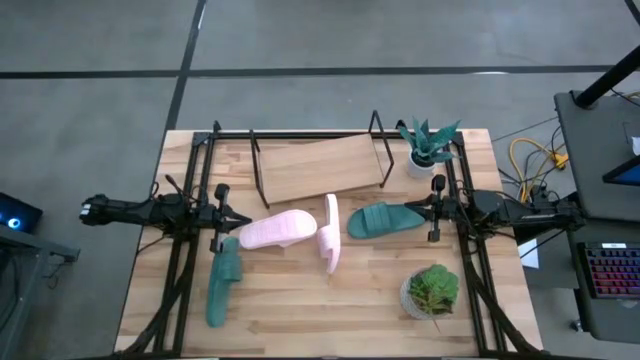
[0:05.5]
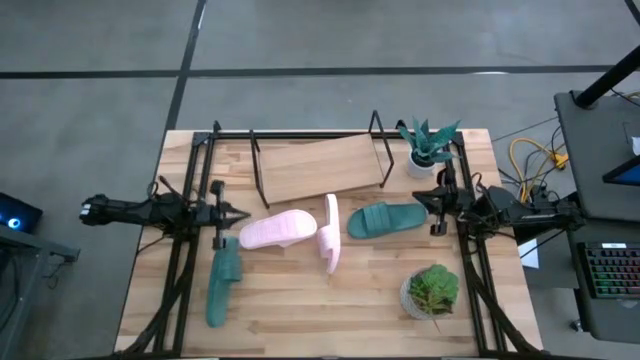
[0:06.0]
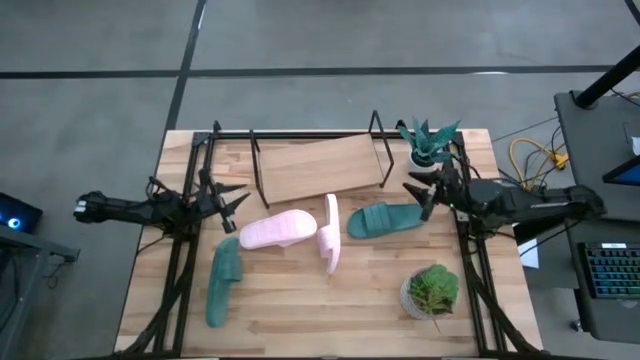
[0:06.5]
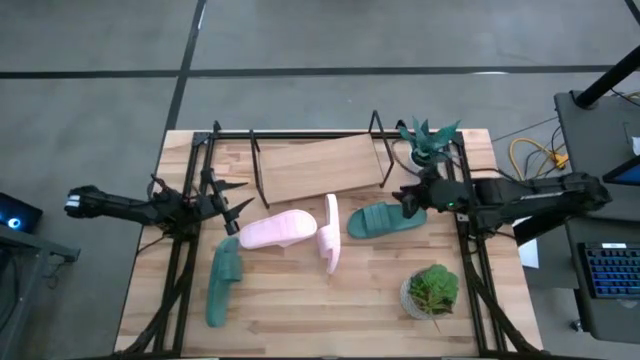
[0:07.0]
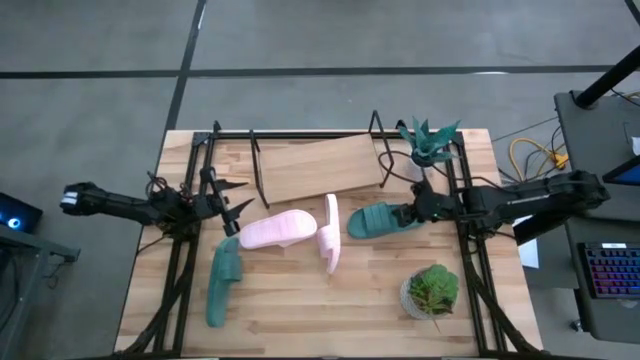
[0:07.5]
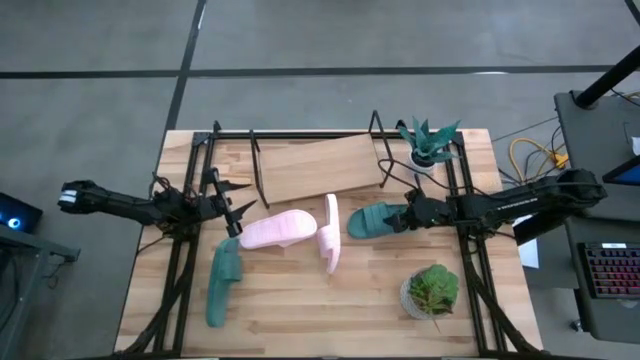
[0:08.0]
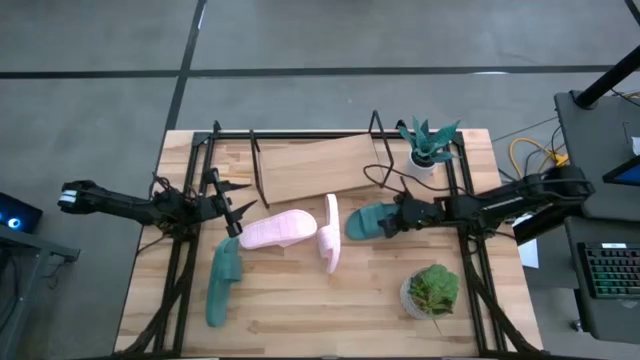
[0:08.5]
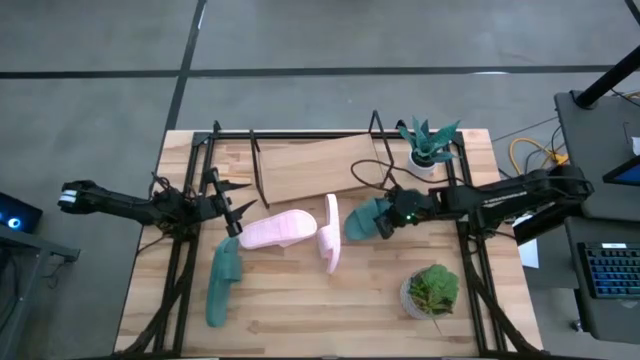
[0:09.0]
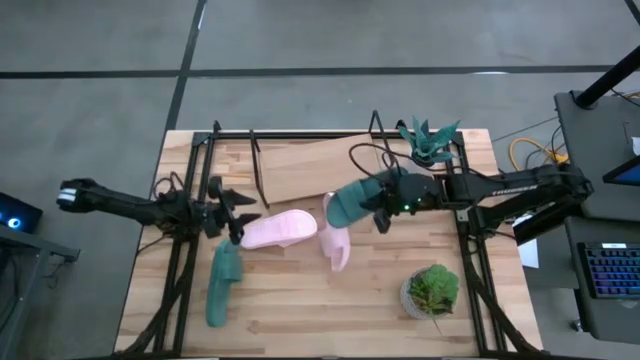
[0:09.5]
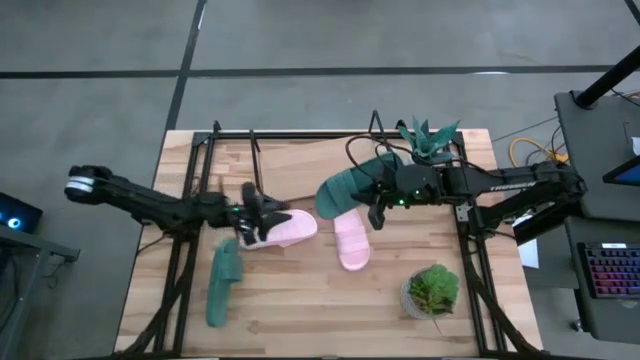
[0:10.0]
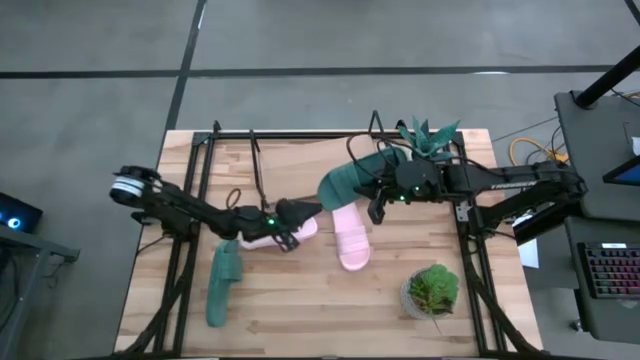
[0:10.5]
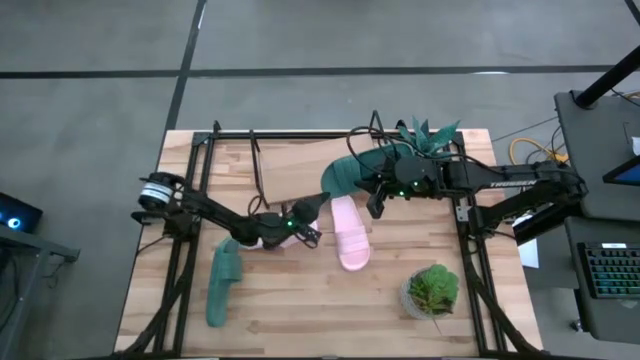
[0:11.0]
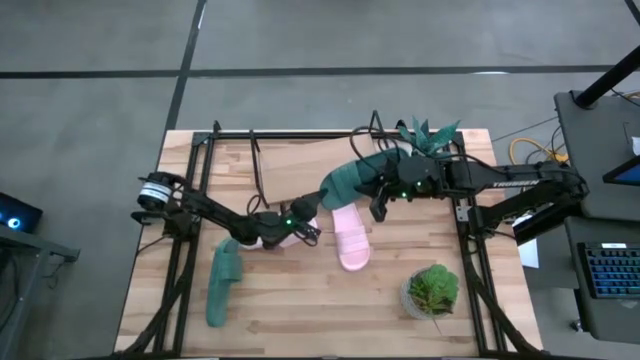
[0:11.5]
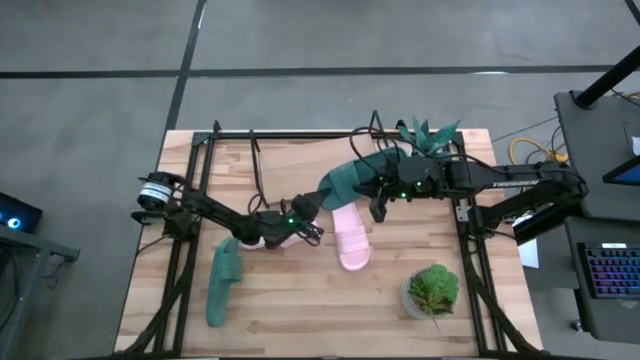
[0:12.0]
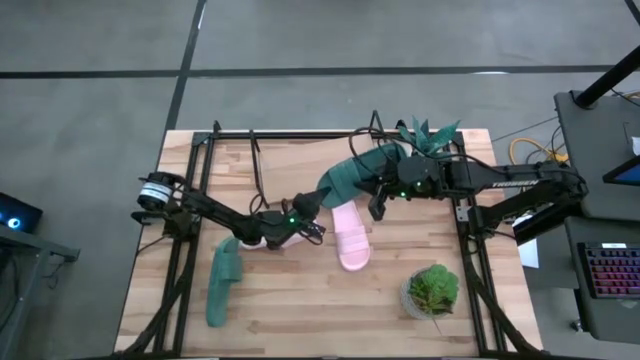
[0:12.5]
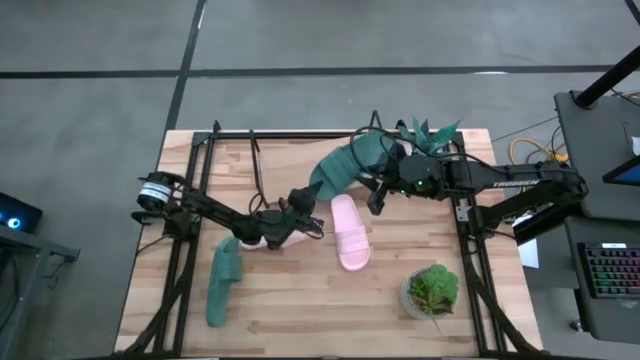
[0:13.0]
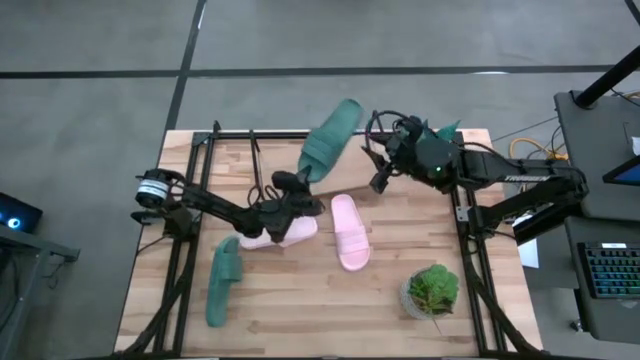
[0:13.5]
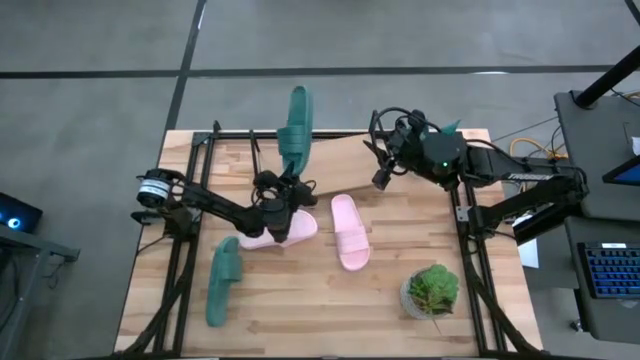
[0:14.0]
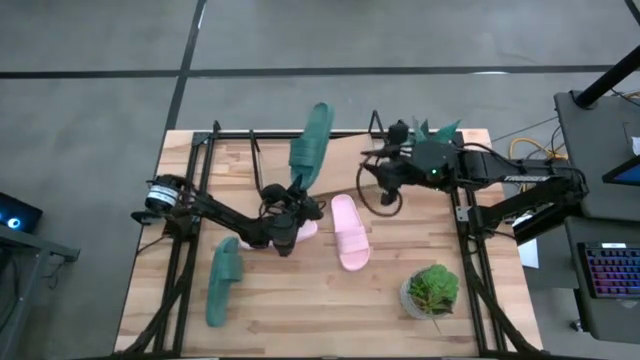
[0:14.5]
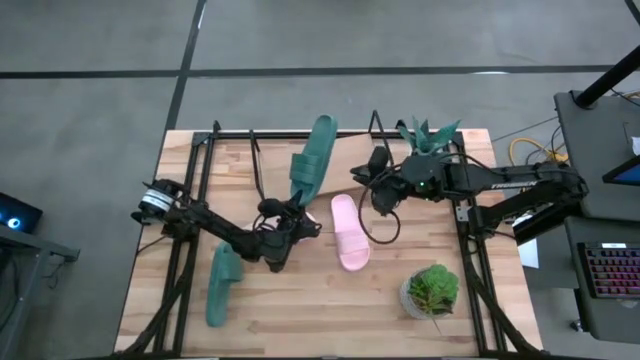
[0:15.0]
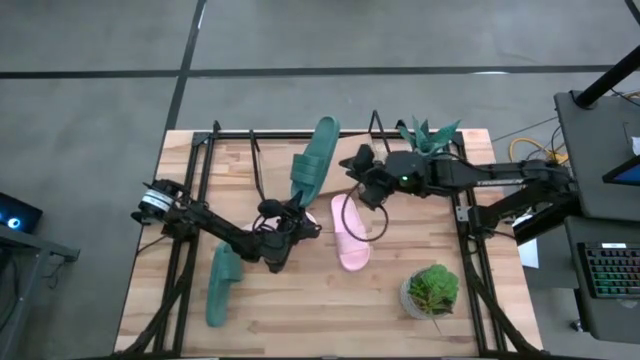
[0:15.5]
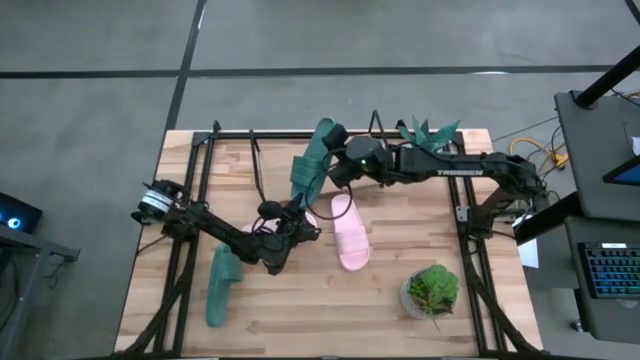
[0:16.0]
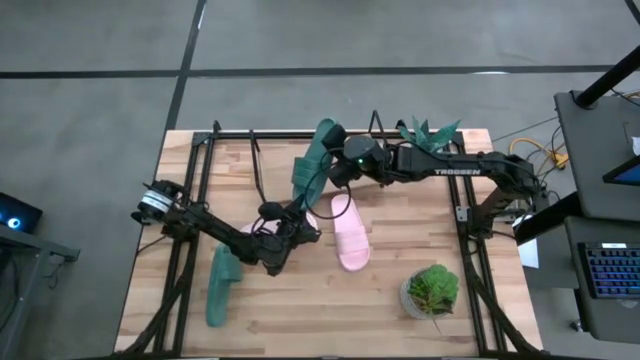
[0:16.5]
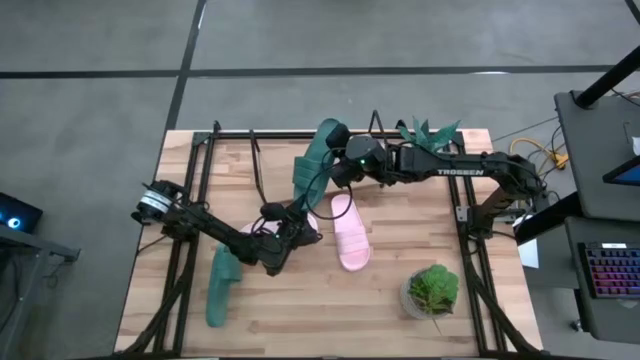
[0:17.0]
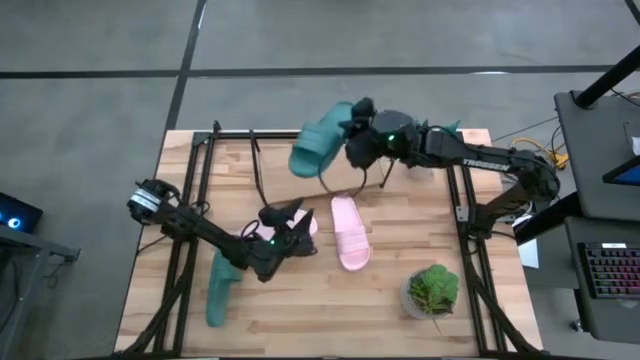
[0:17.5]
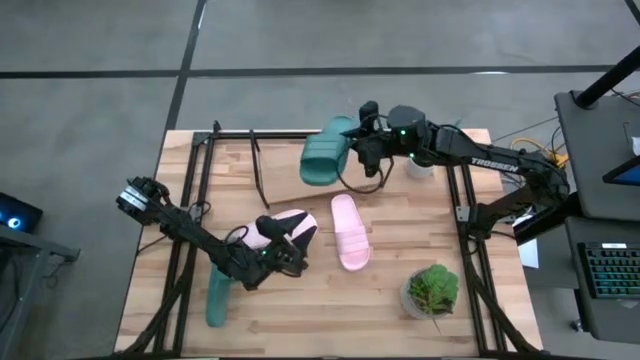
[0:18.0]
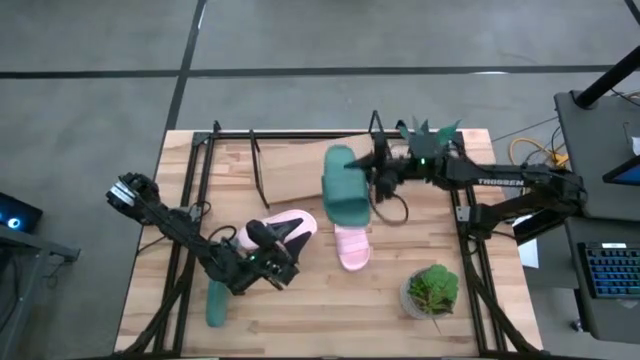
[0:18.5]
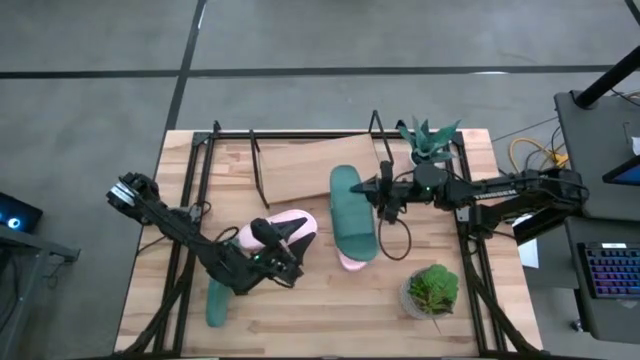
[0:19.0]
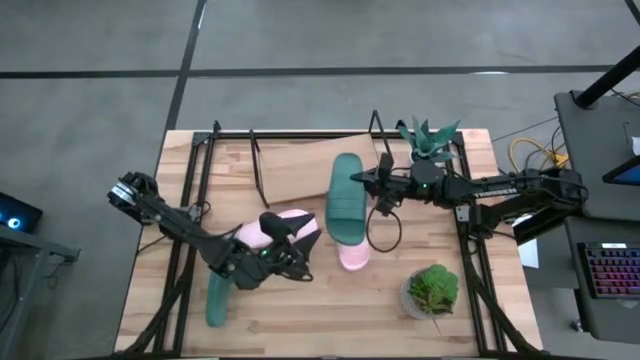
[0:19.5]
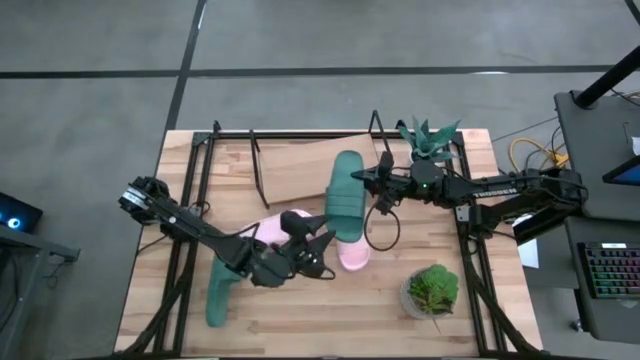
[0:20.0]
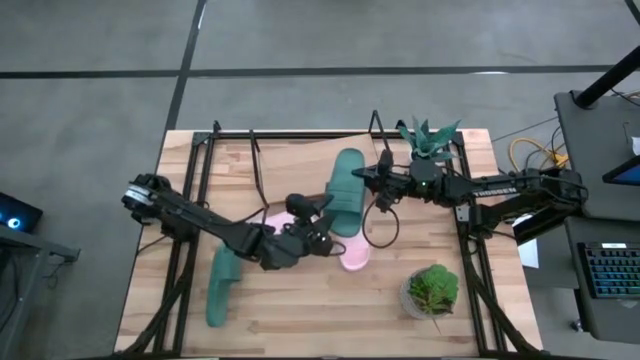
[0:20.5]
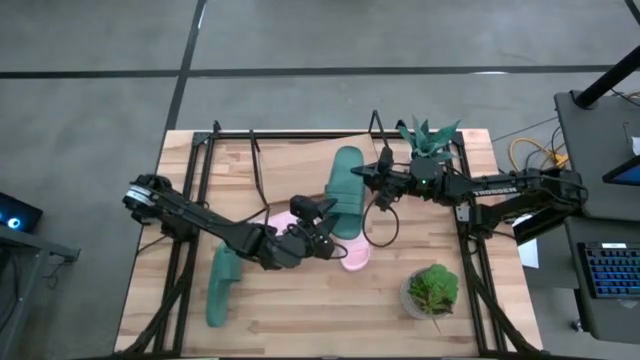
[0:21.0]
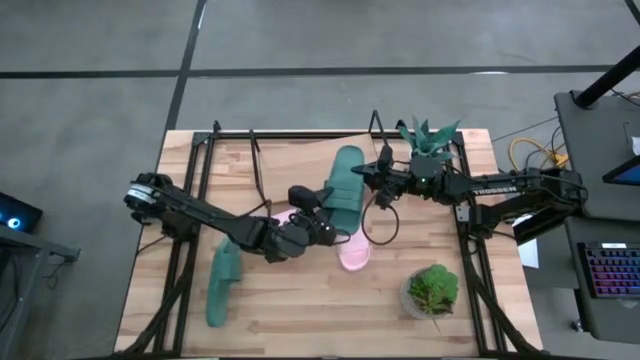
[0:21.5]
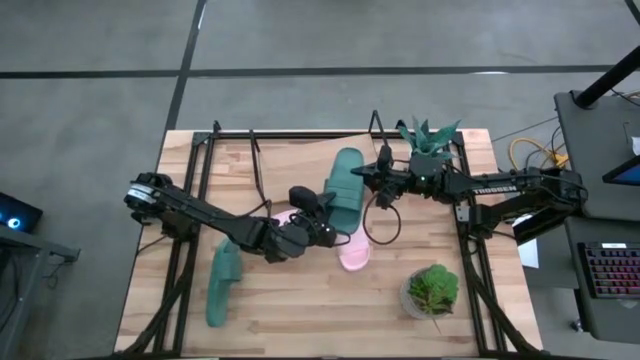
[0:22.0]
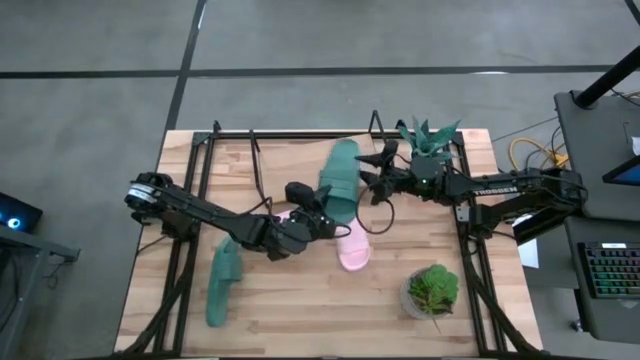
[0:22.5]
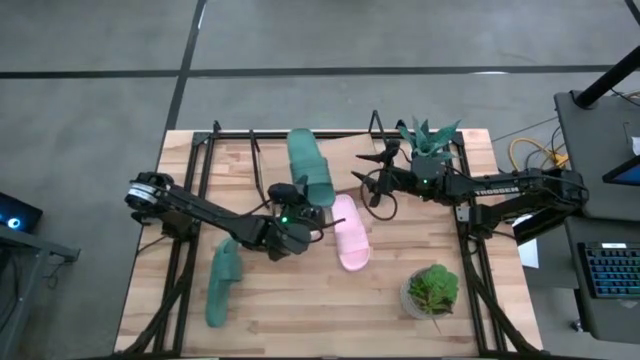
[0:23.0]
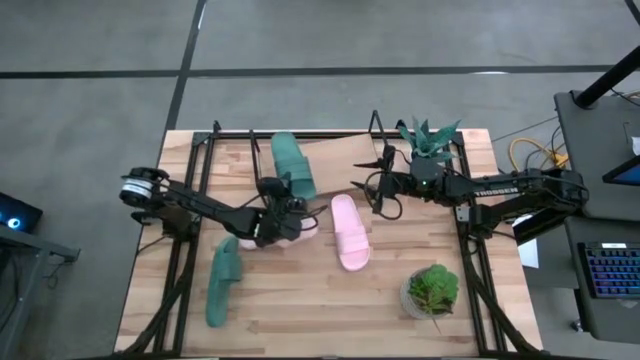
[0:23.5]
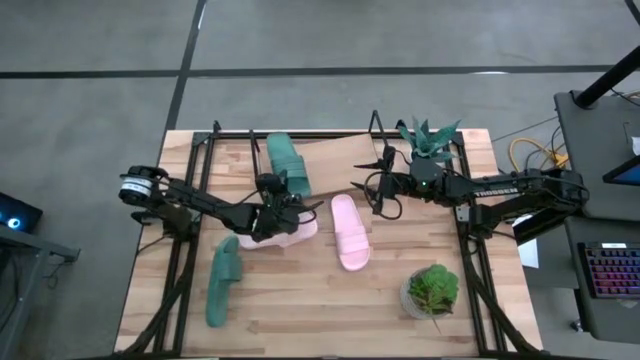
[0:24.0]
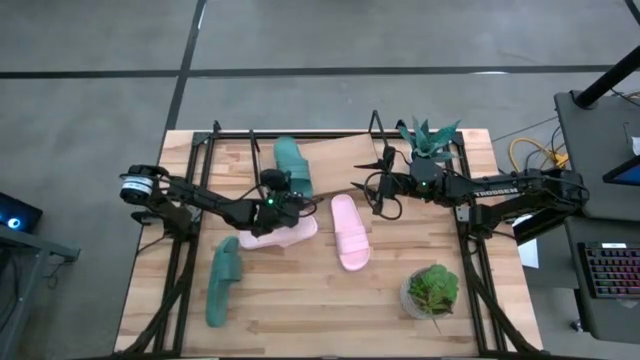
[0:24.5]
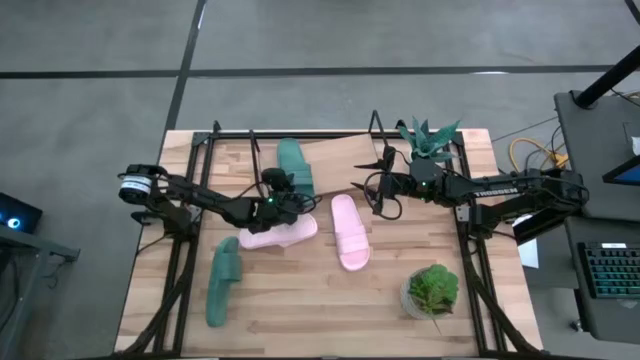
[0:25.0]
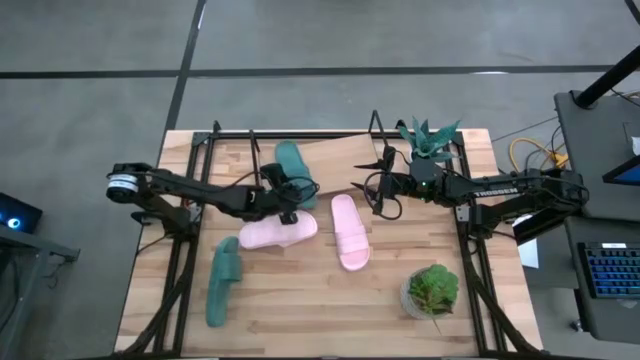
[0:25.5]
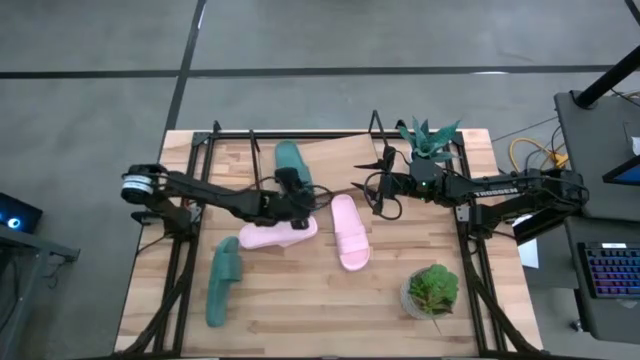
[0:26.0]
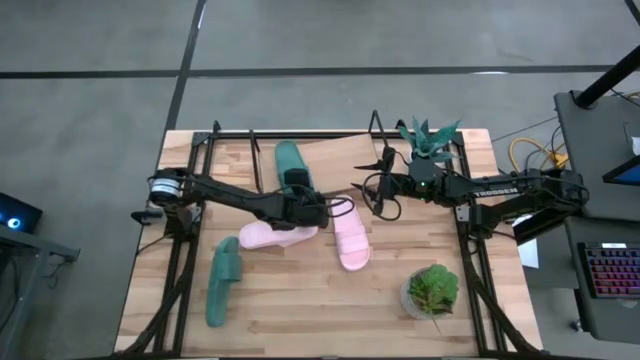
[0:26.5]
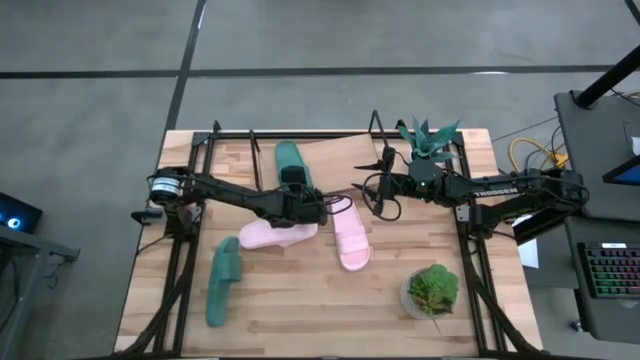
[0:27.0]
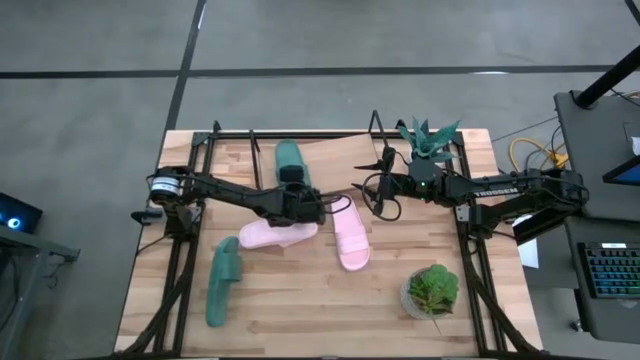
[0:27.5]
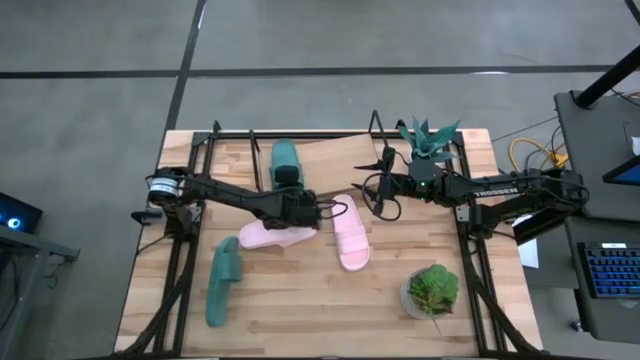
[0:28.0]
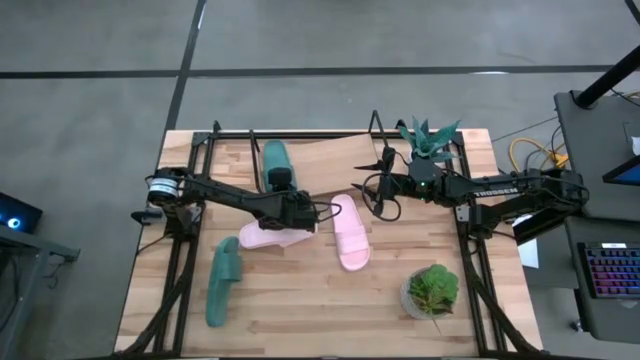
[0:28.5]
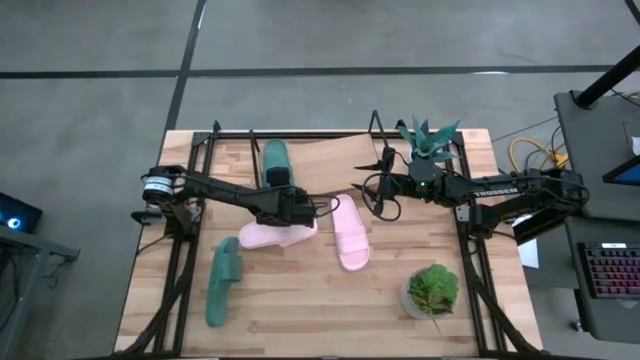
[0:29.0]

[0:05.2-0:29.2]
Task: Pick and place slides into the shelf
Put the top green slide on the shelf
